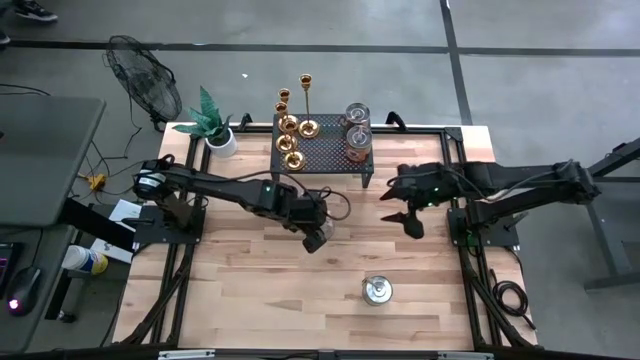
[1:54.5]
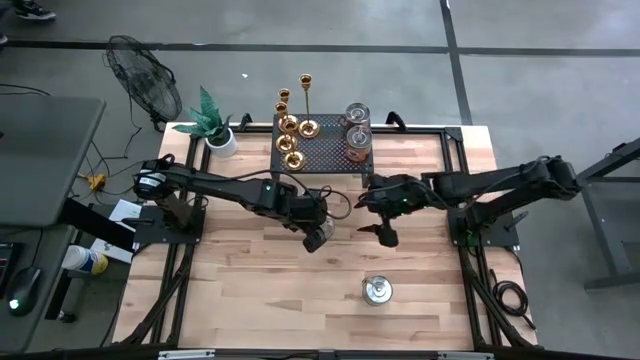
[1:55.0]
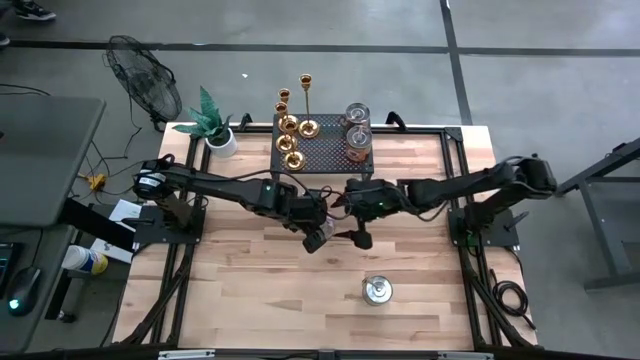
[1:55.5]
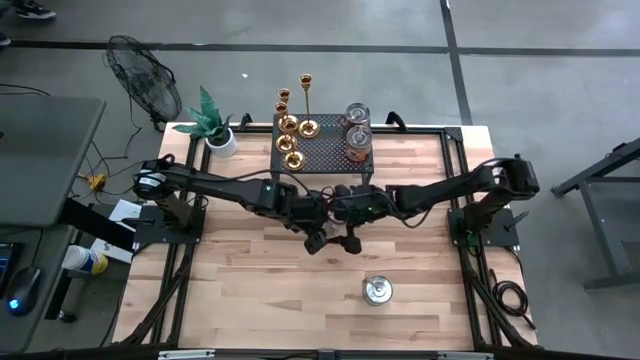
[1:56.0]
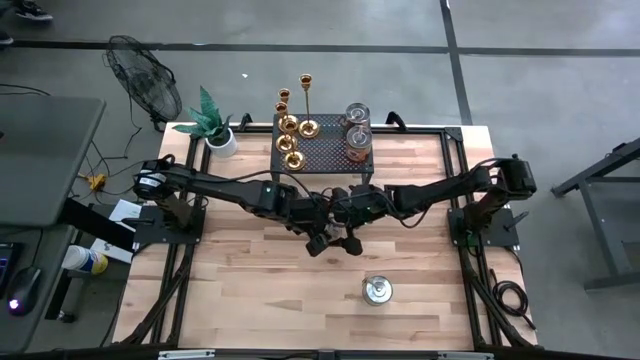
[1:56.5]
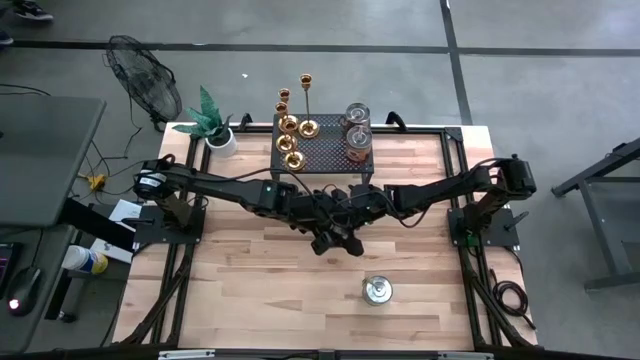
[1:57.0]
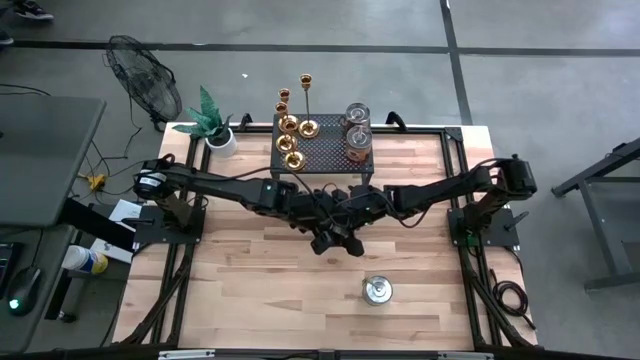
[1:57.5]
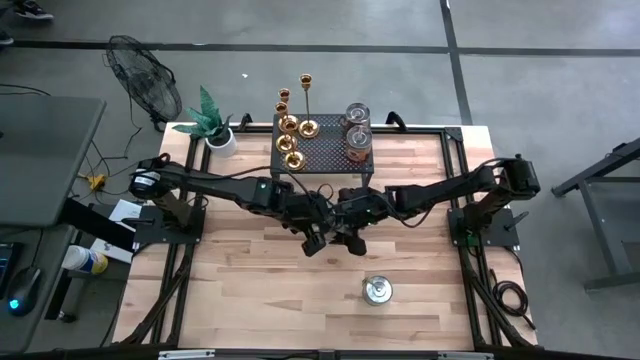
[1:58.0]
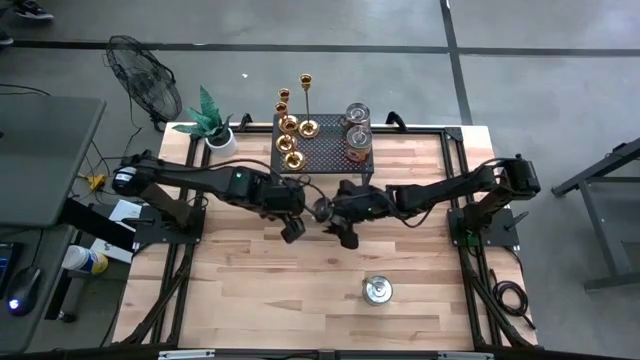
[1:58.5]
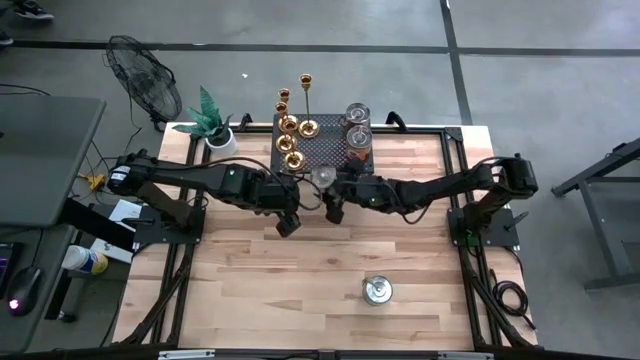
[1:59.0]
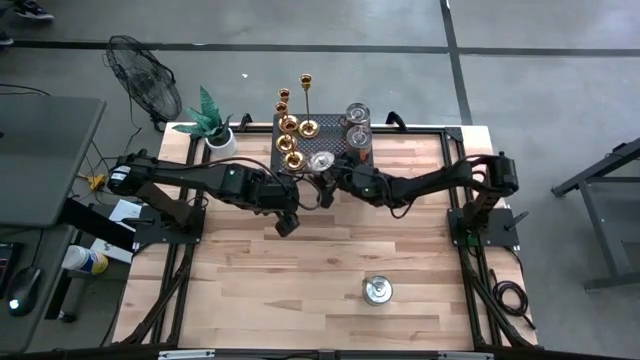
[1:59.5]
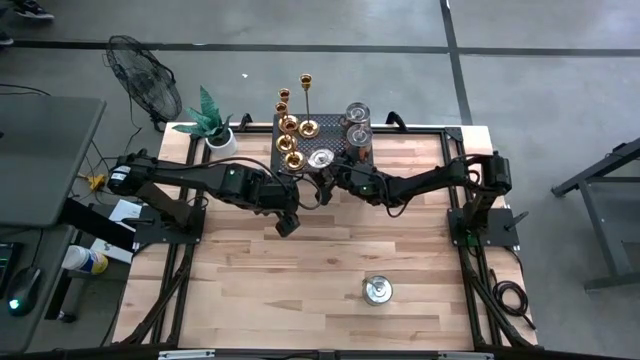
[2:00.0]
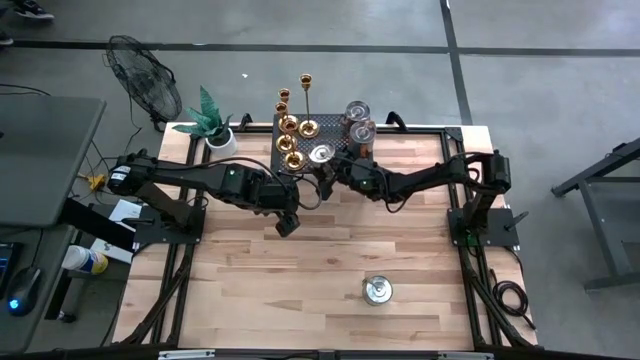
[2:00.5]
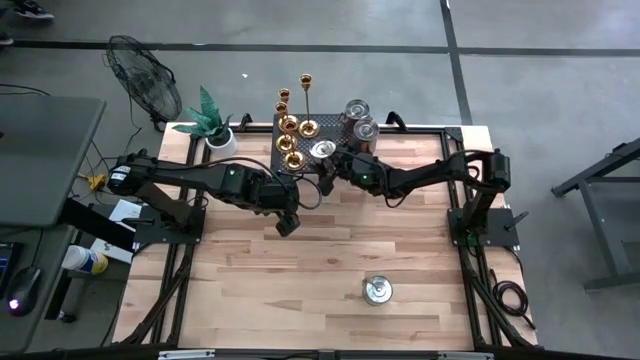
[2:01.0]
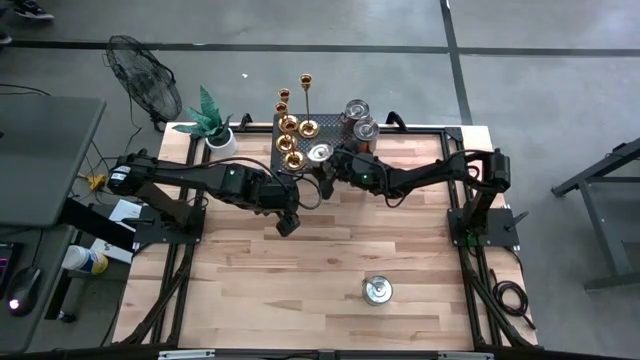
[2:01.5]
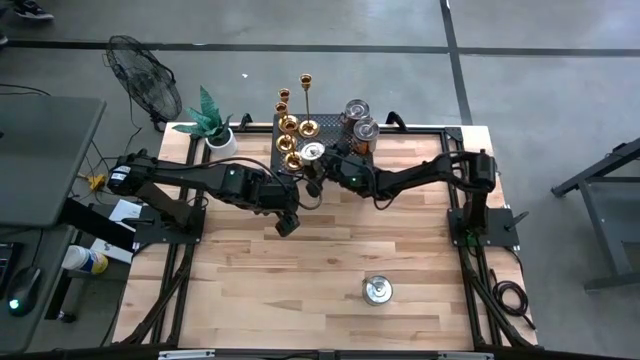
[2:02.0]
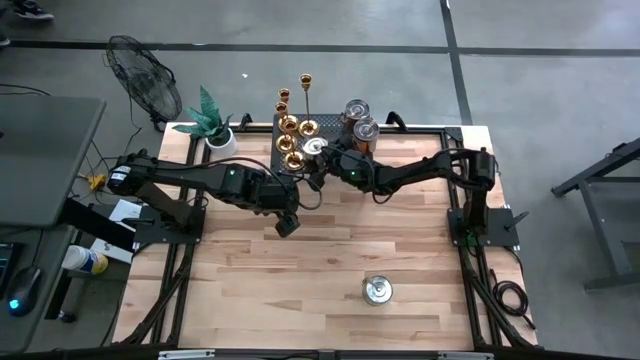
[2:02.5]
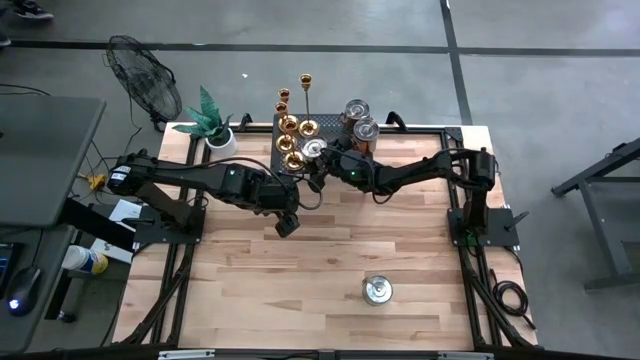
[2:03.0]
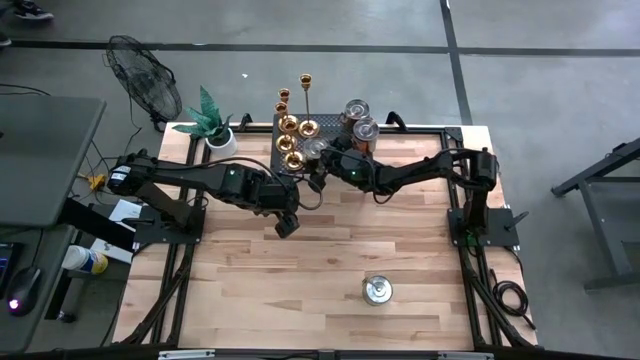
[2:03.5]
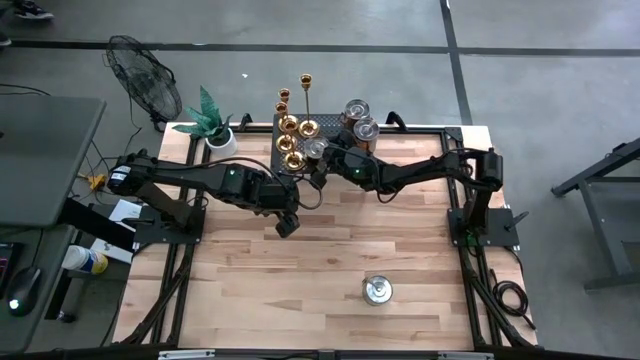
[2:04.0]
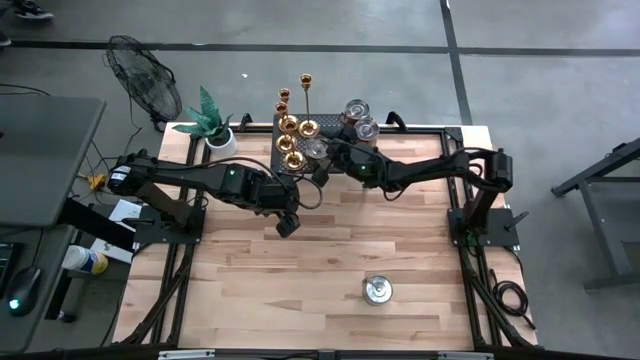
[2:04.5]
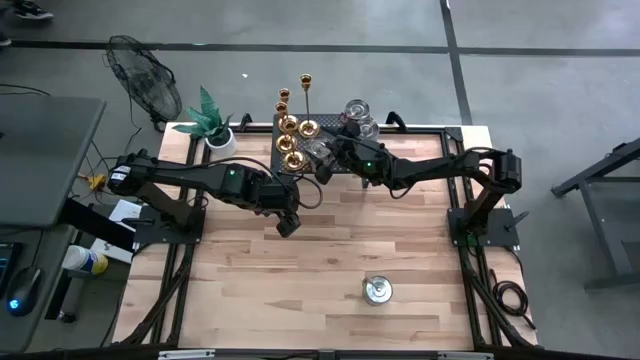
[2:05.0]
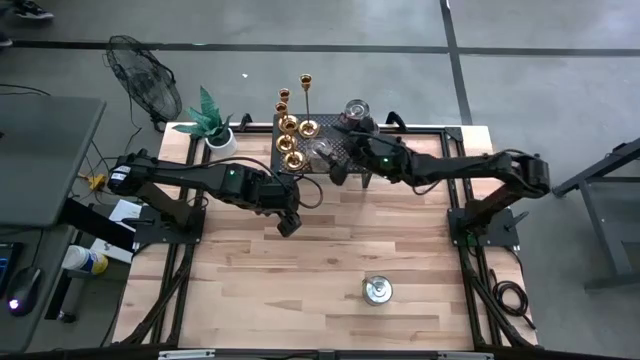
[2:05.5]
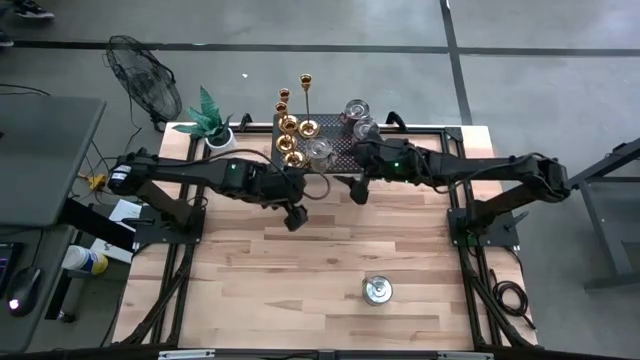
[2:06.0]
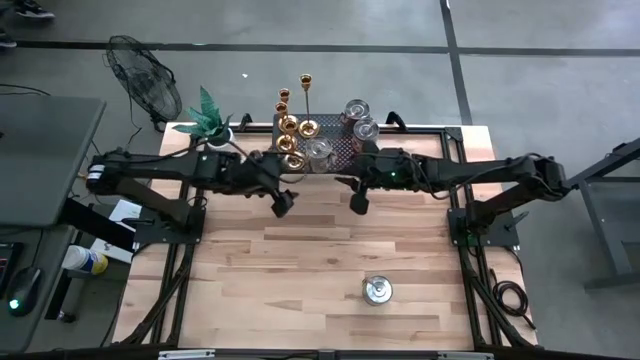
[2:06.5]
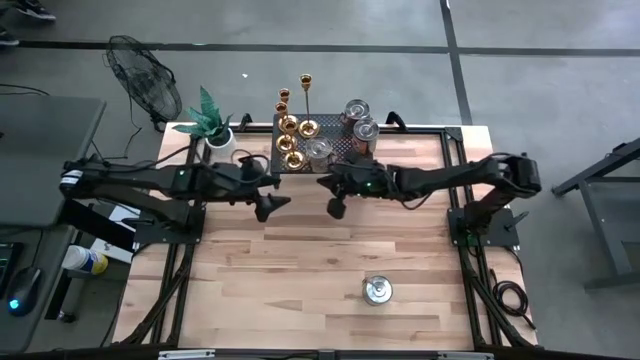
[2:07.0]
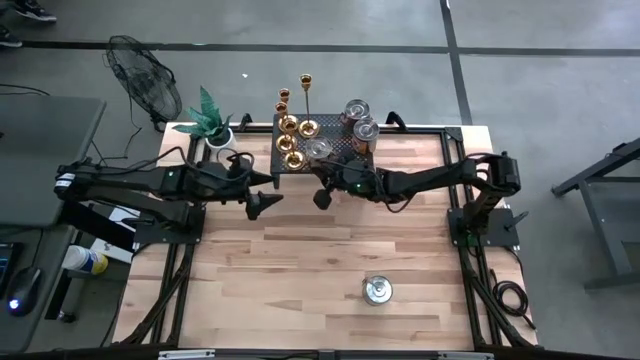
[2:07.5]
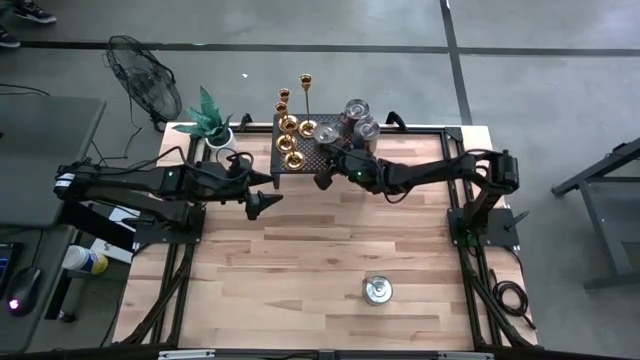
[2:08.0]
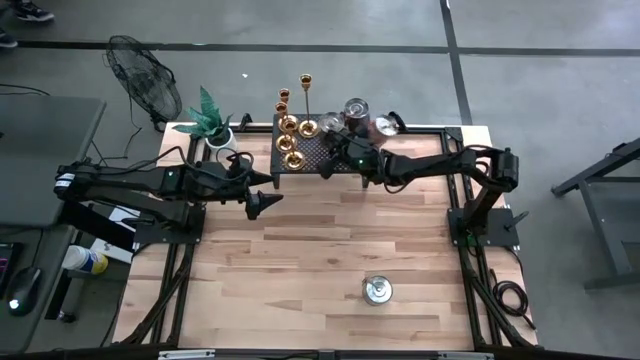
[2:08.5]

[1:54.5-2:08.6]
Task: Pick & Place candle stick holders
Put the brown scented candle on the shelf

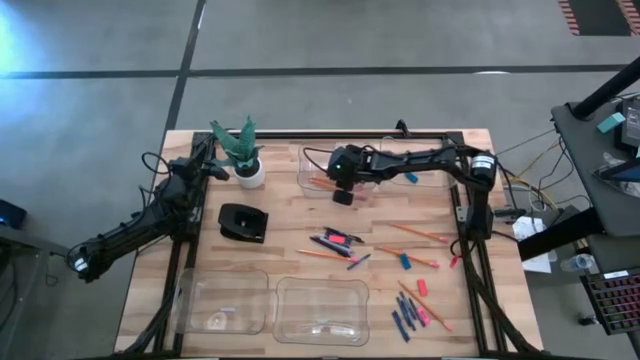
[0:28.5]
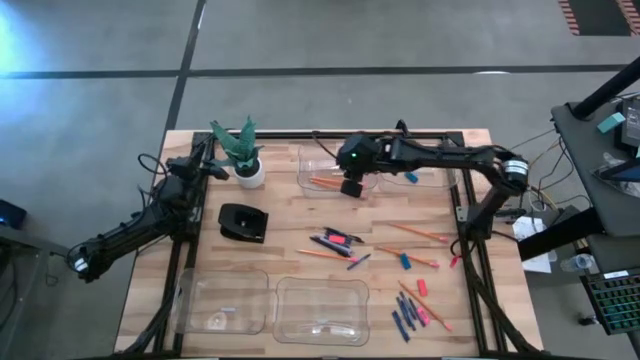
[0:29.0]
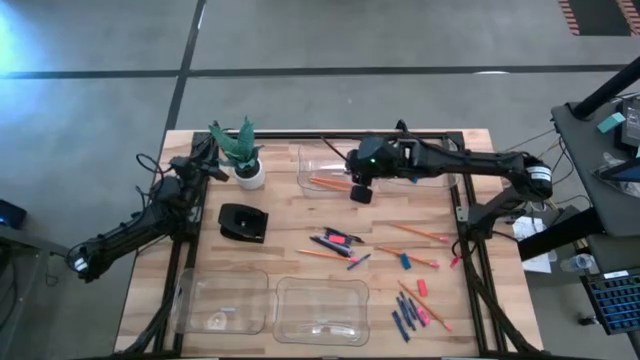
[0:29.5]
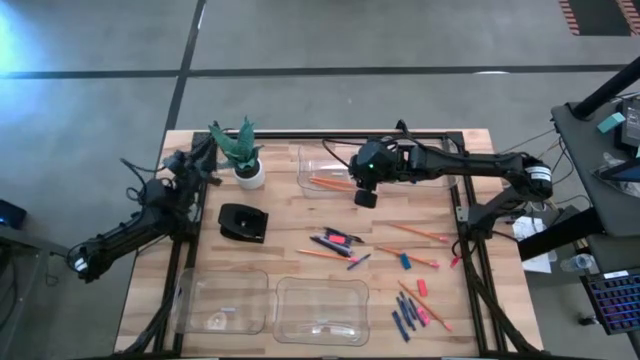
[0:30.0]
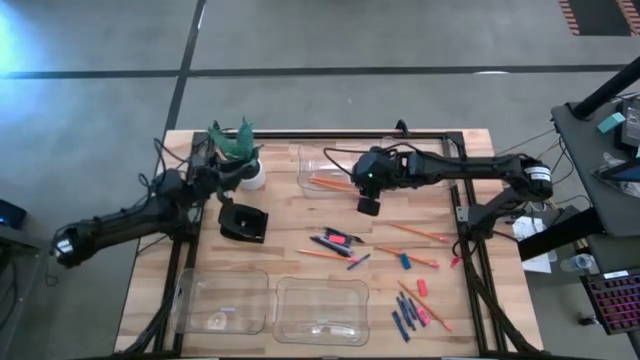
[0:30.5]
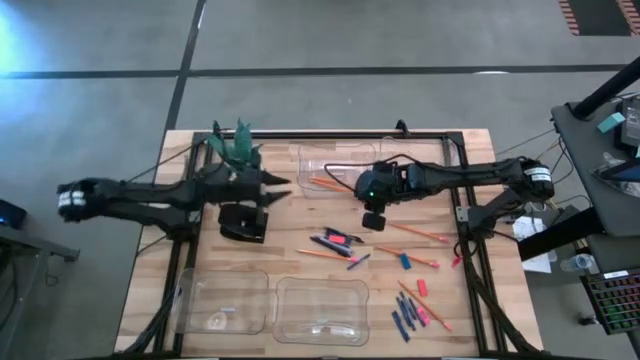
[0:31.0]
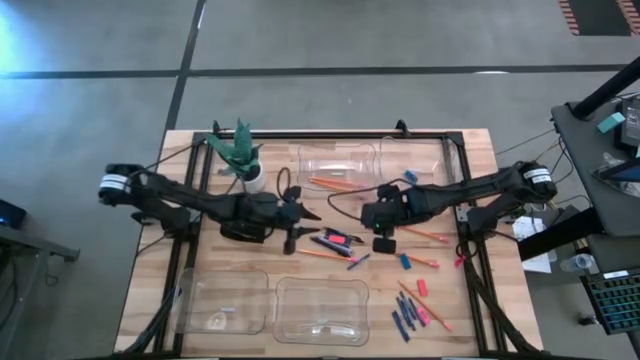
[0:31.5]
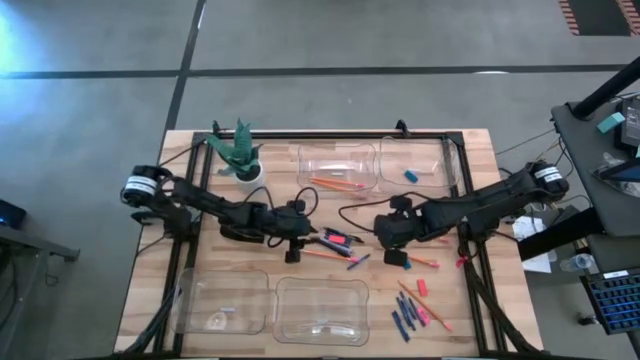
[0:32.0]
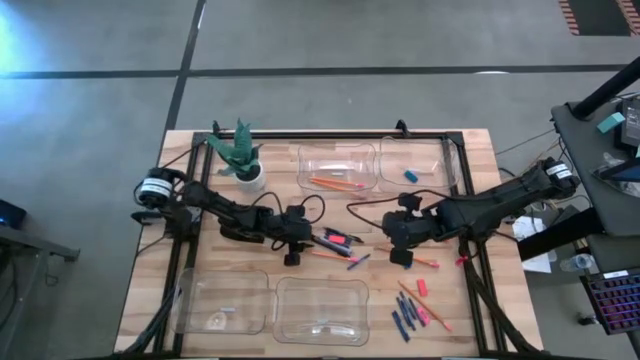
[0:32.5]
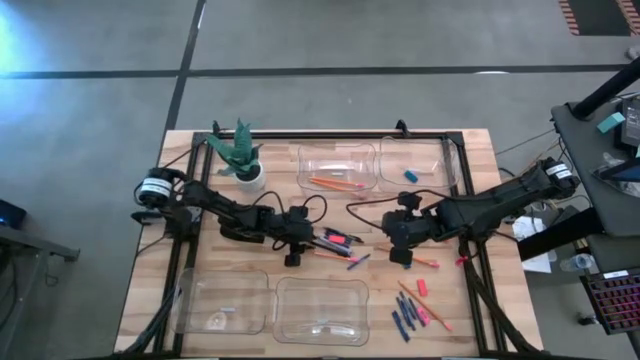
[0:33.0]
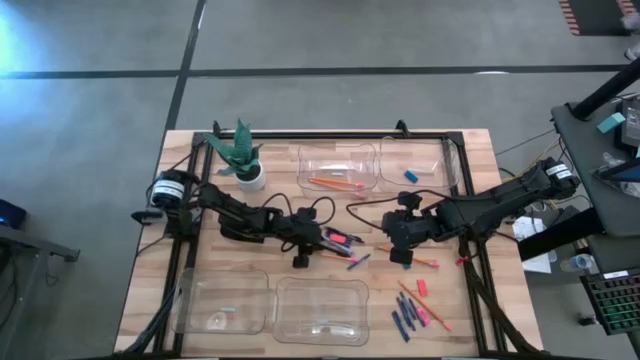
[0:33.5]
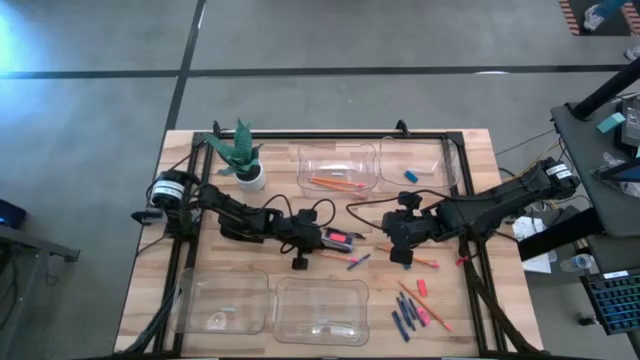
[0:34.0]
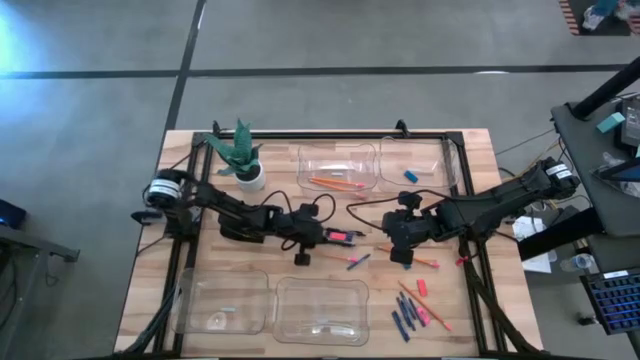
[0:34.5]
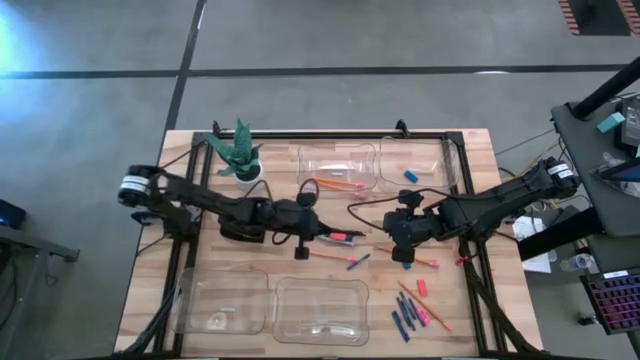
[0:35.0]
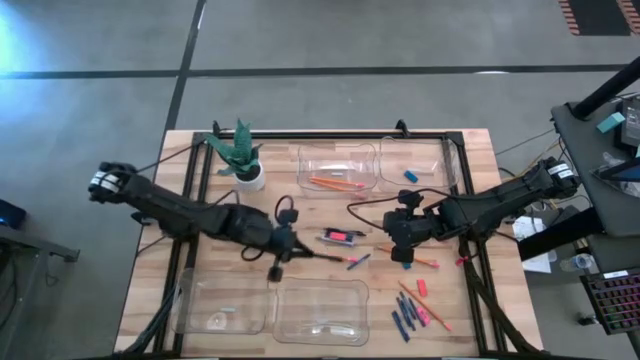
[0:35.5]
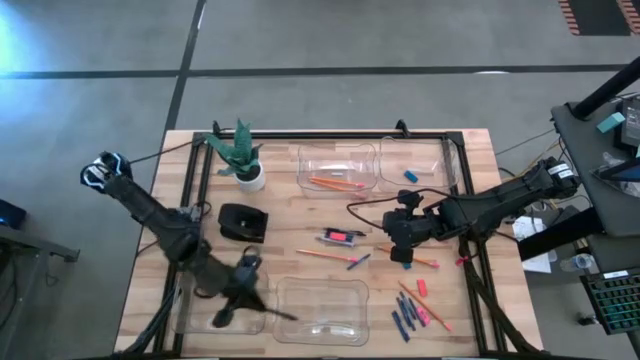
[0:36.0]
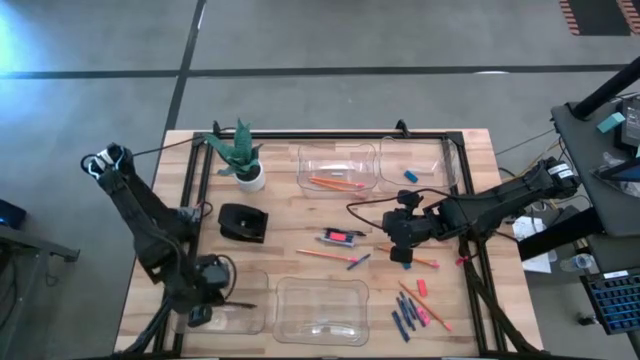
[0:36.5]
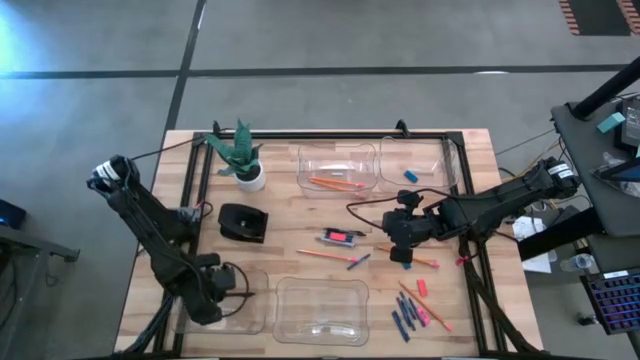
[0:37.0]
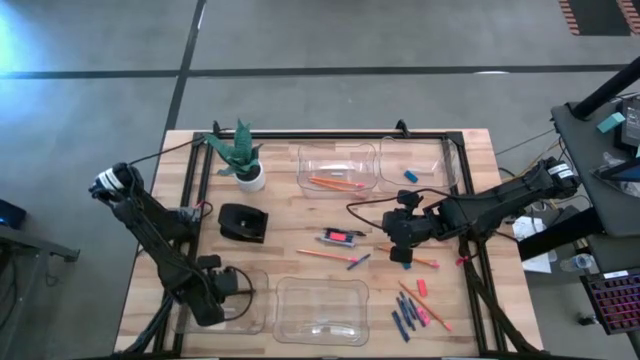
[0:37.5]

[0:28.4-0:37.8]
Task: Sort crayons/erasers/pens/pencils in bins
Put the black pen into the bottom left transparent bin
